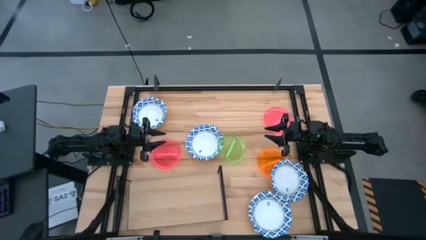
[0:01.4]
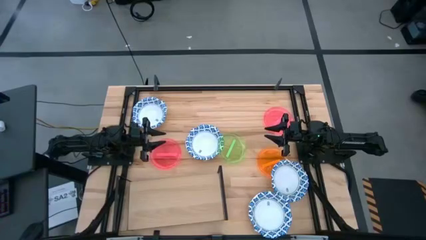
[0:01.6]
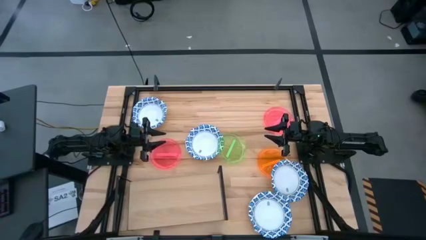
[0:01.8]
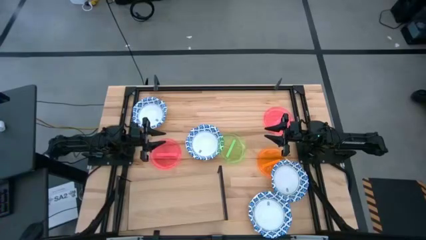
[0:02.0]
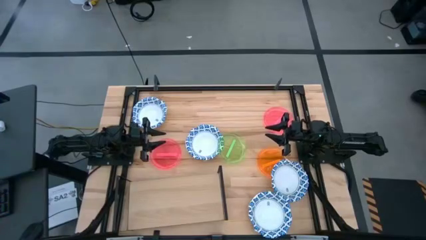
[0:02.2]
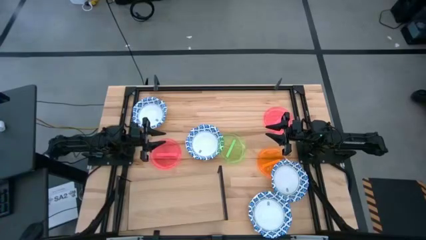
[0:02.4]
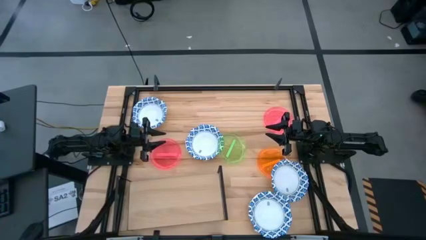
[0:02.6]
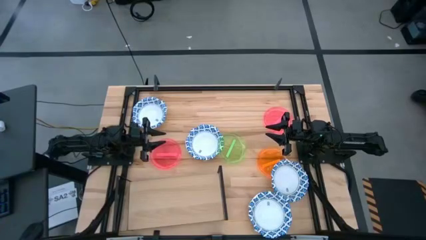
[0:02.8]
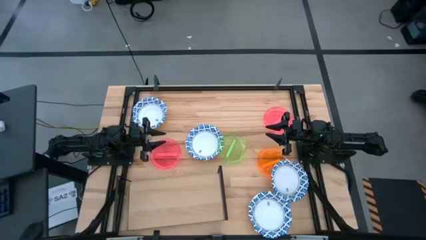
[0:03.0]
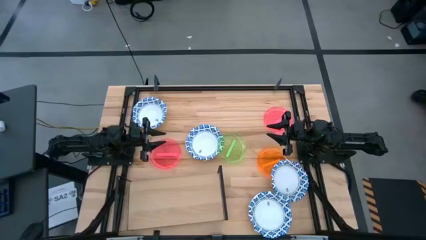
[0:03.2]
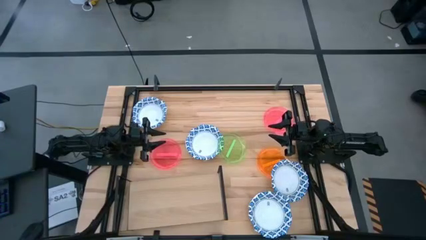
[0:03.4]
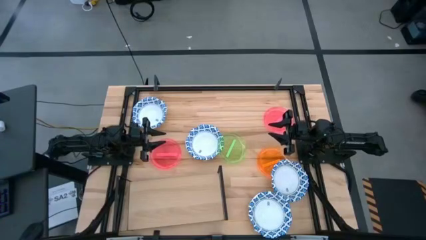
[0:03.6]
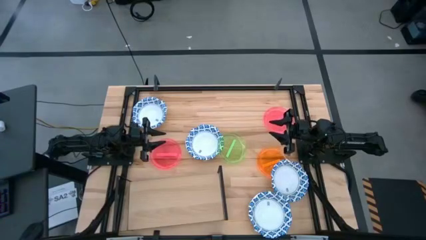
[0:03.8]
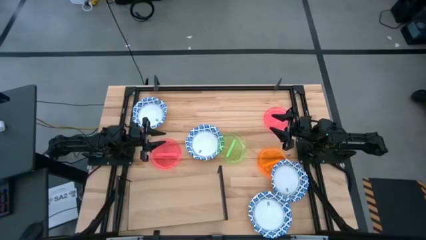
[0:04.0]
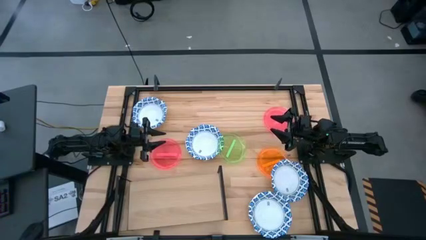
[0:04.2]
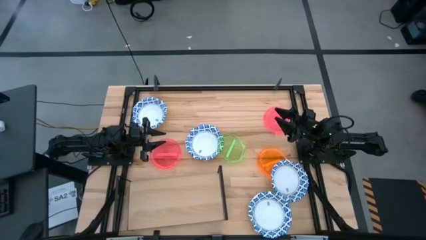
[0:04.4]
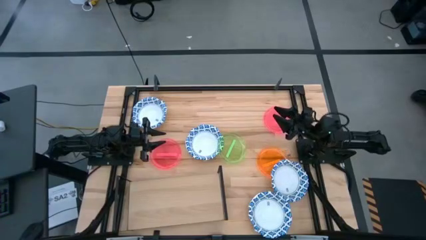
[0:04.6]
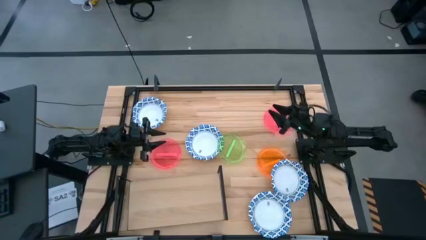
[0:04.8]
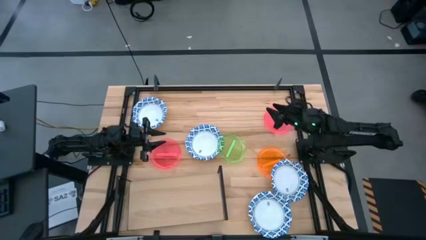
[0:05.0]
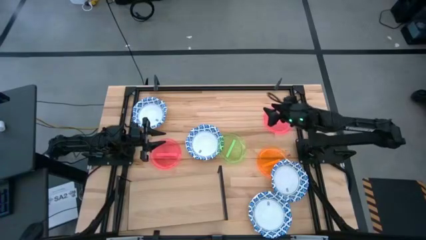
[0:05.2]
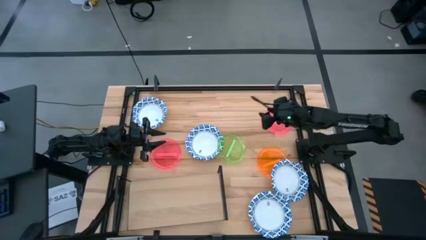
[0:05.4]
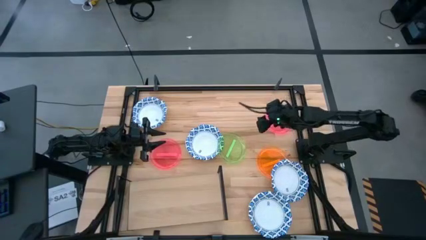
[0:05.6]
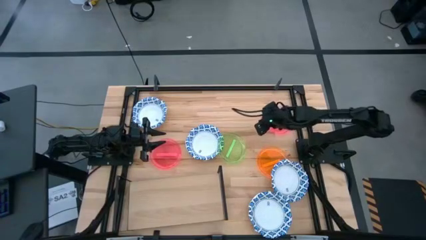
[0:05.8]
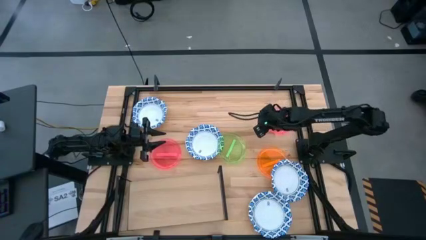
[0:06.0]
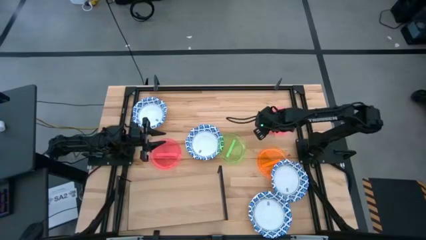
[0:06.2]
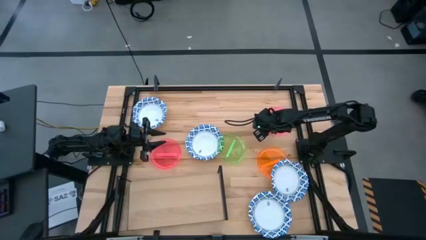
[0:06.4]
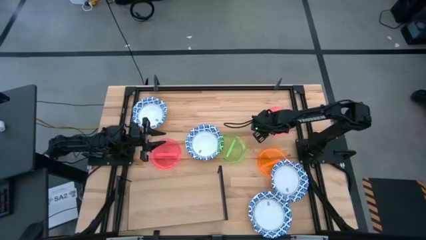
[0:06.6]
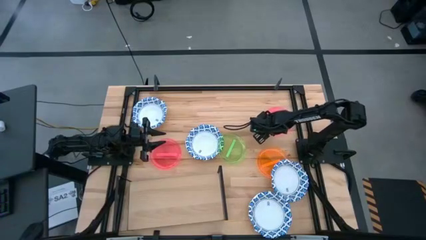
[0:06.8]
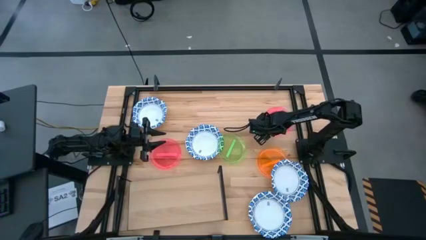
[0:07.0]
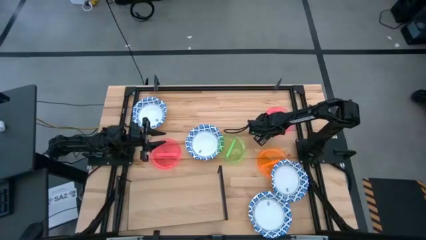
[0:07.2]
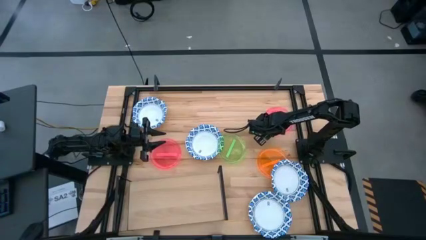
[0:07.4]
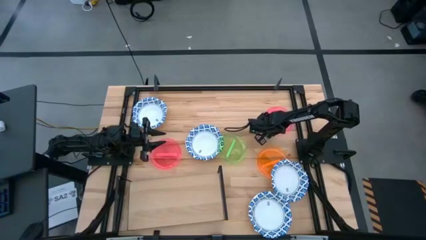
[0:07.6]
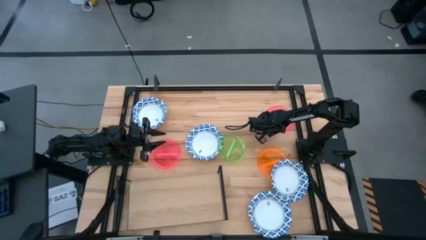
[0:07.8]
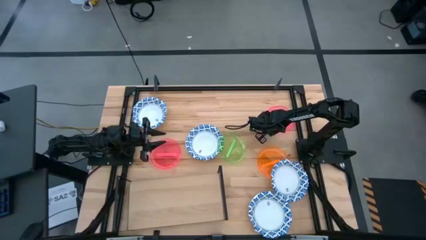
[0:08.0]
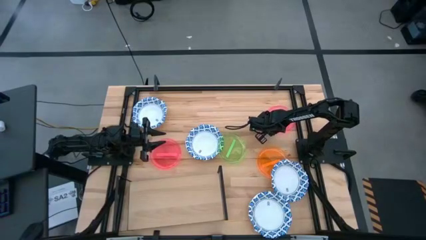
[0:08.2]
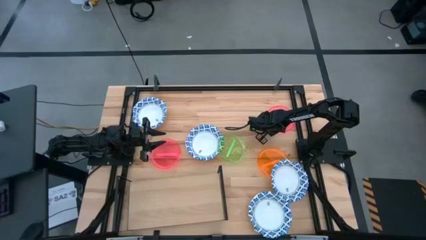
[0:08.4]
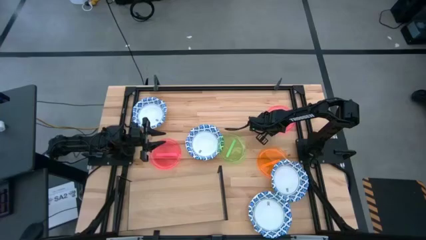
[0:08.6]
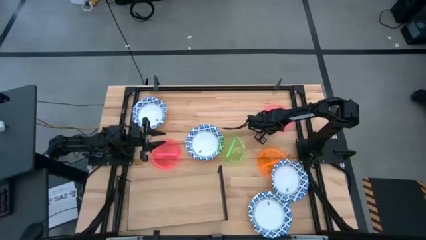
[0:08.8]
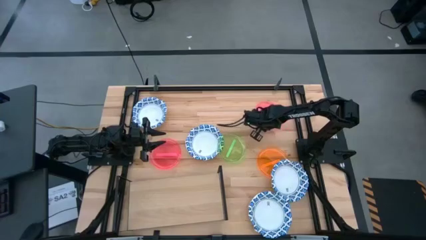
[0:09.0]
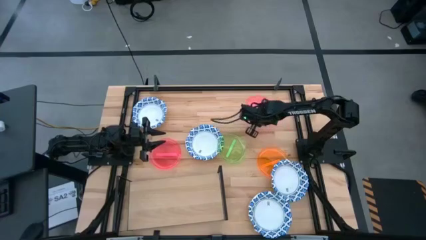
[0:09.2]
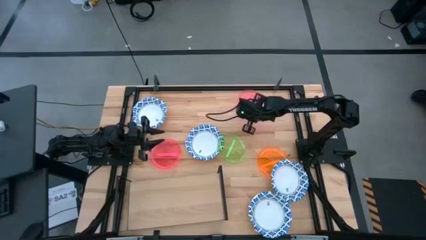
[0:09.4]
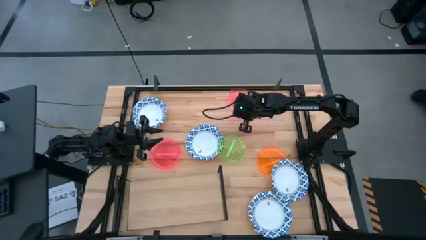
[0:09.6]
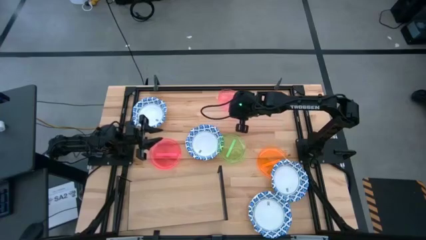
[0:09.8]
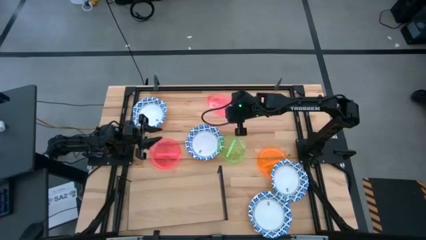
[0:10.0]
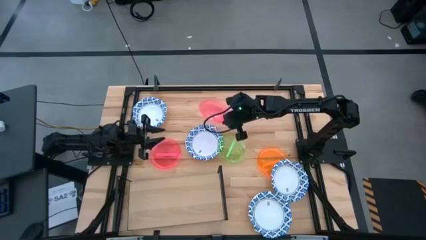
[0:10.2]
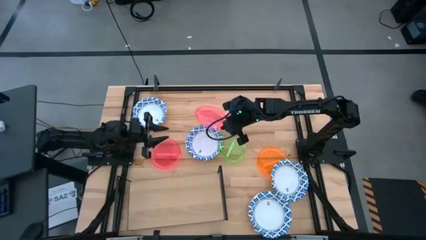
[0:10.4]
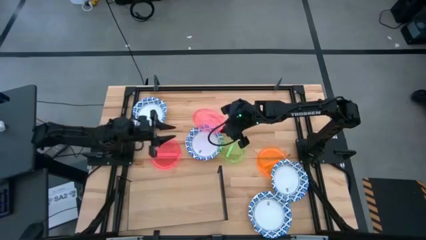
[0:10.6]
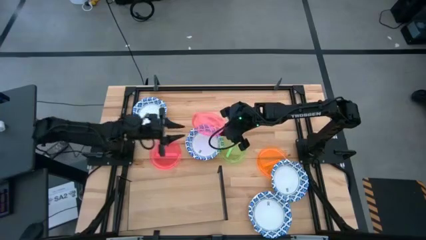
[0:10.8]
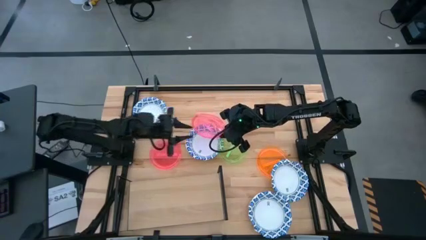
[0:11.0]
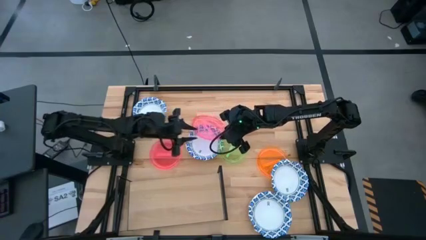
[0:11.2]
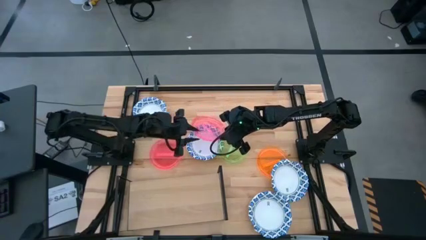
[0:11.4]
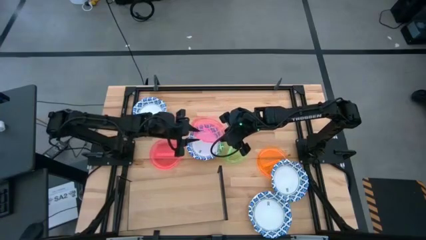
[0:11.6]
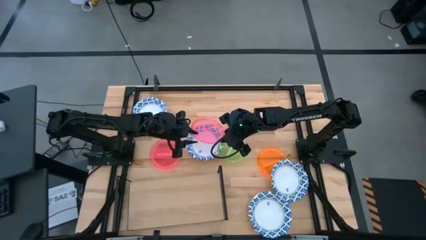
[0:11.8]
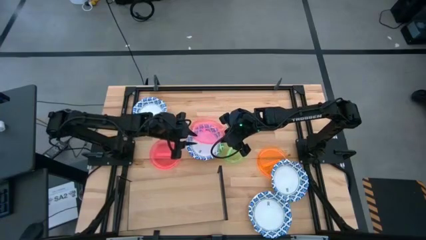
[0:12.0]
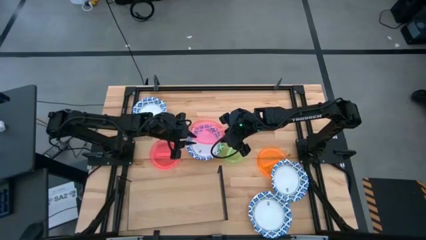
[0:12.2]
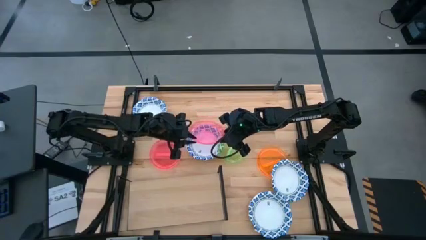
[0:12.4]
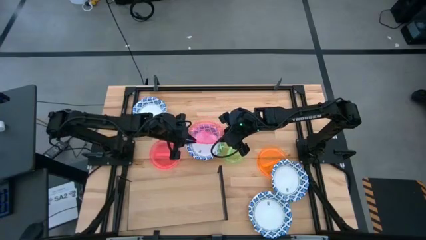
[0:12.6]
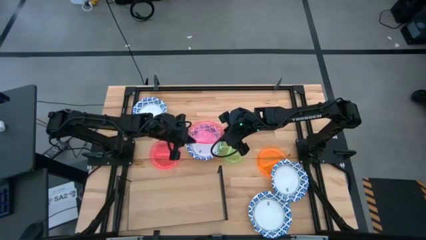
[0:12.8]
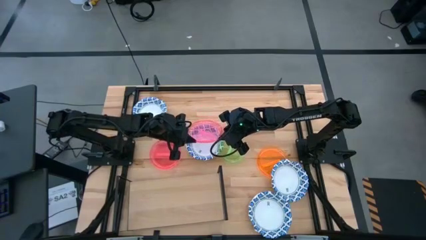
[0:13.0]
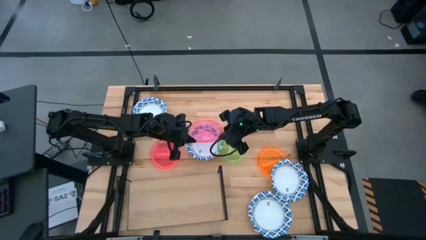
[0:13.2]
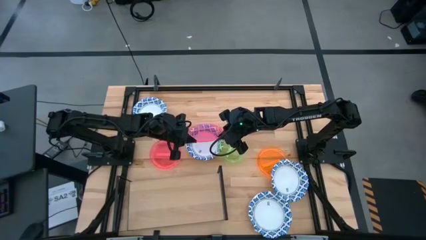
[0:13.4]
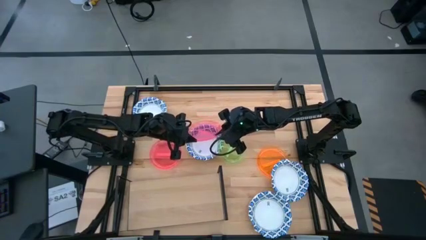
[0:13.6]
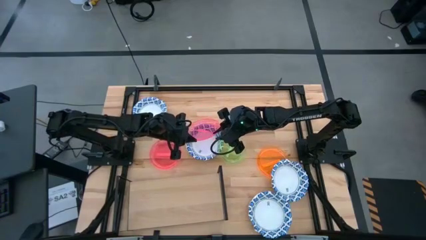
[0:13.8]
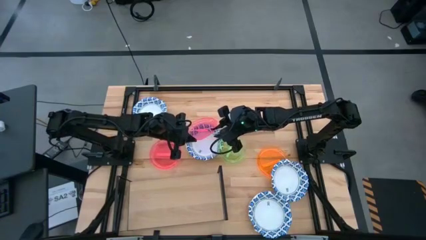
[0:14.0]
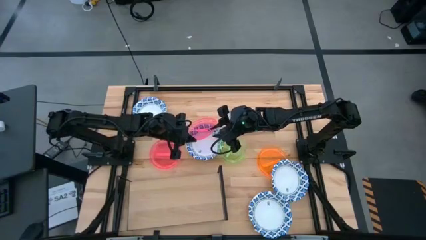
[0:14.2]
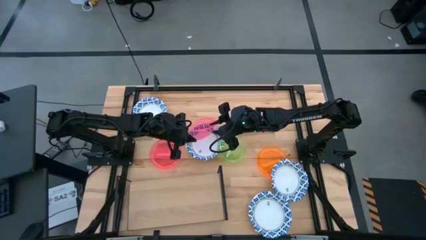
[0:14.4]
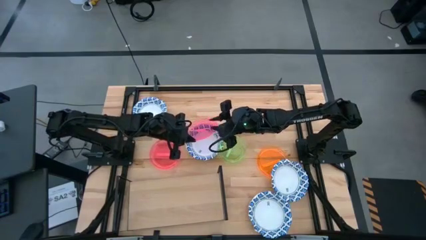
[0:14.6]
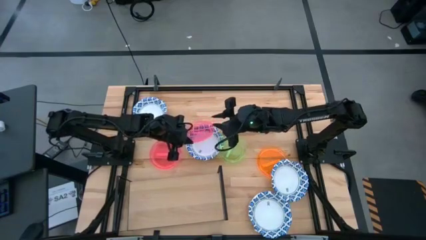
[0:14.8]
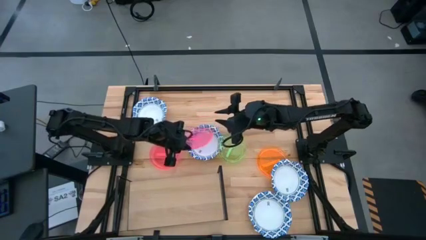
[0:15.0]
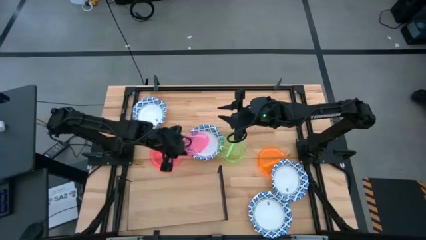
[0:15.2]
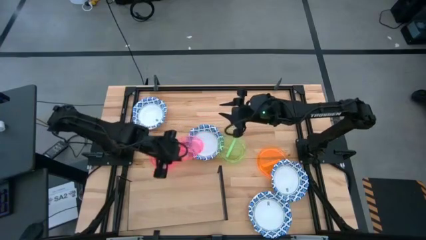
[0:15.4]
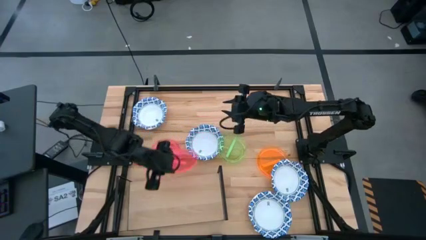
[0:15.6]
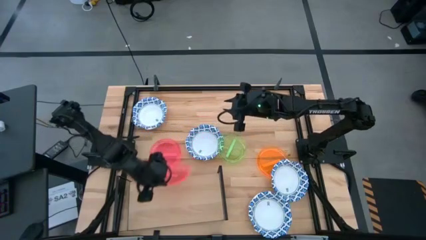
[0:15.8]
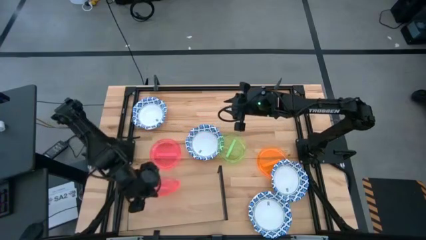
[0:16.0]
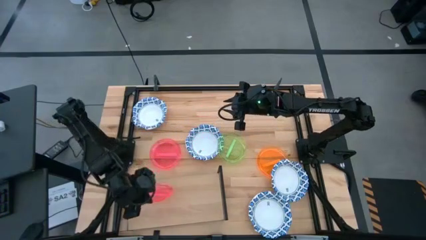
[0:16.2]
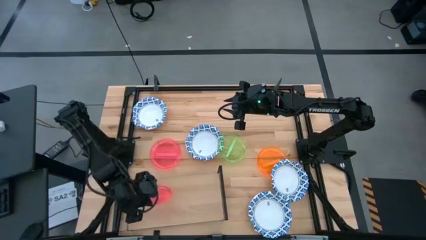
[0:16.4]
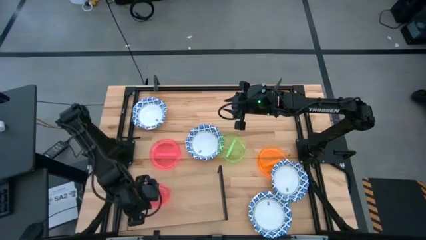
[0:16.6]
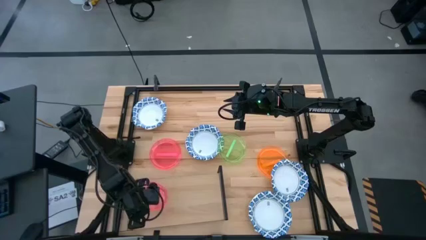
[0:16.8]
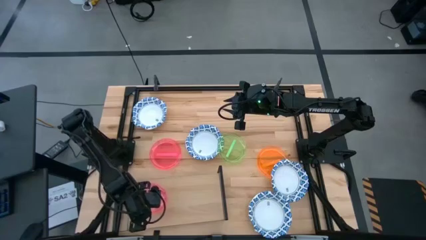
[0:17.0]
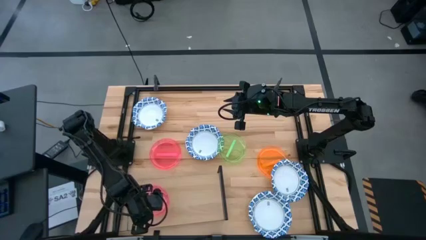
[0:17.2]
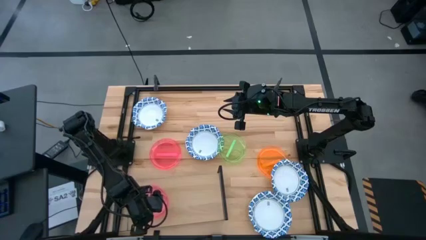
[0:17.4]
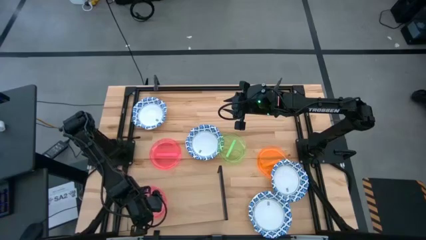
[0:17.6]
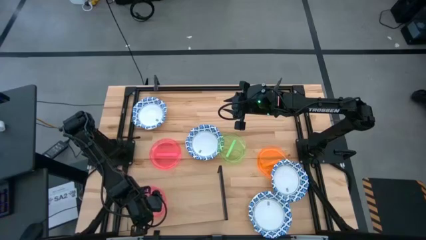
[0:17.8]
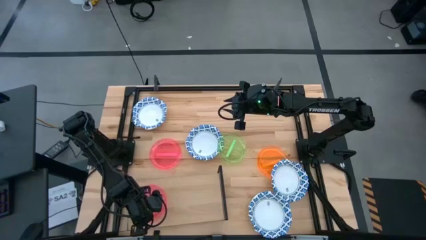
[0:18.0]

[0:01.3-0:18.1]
Task: Place and stack plates onto a shelf
Put the right pink plate on the shelf
